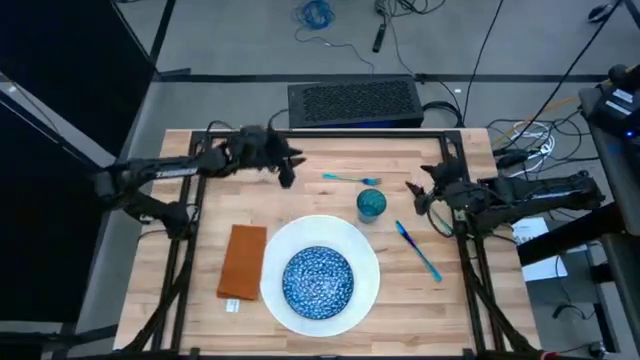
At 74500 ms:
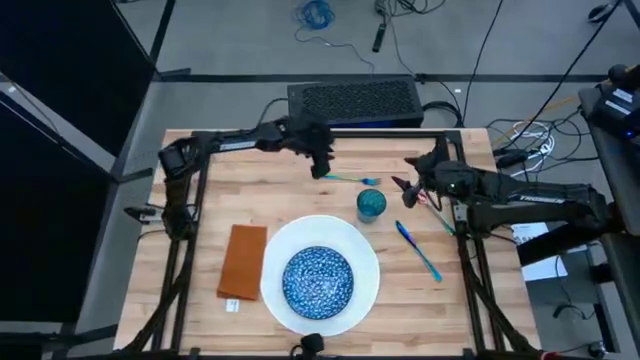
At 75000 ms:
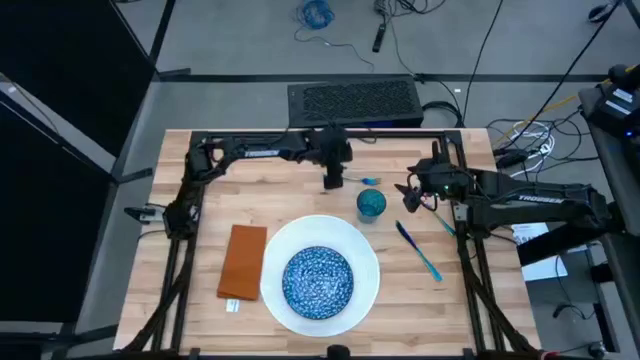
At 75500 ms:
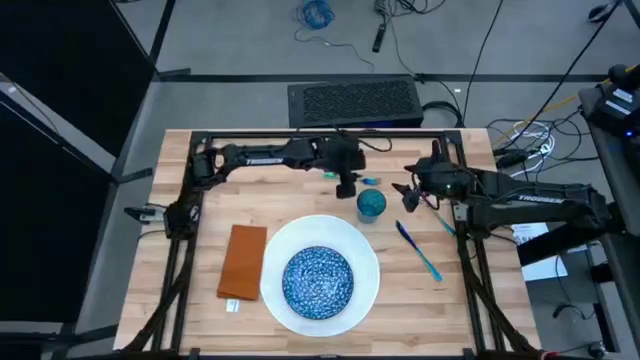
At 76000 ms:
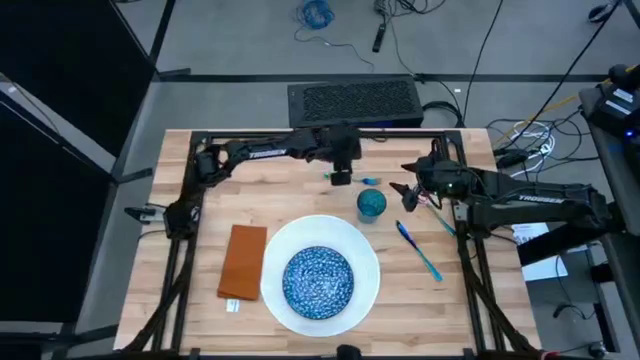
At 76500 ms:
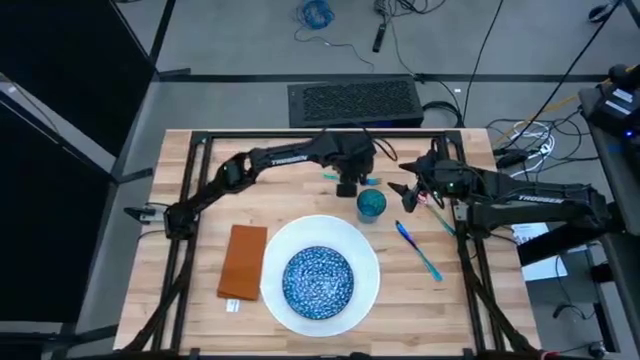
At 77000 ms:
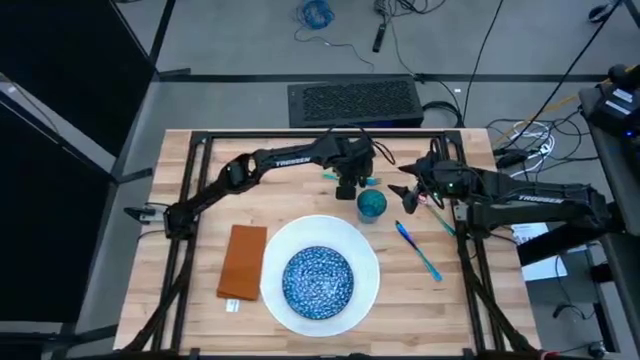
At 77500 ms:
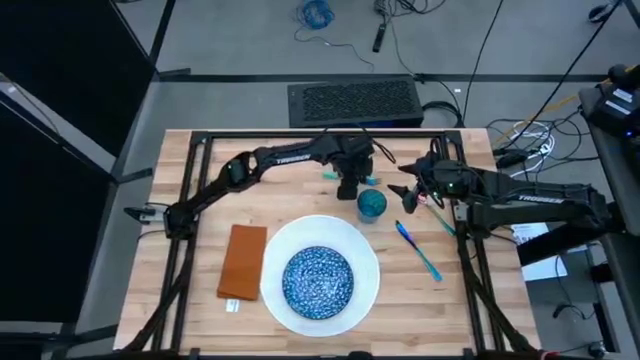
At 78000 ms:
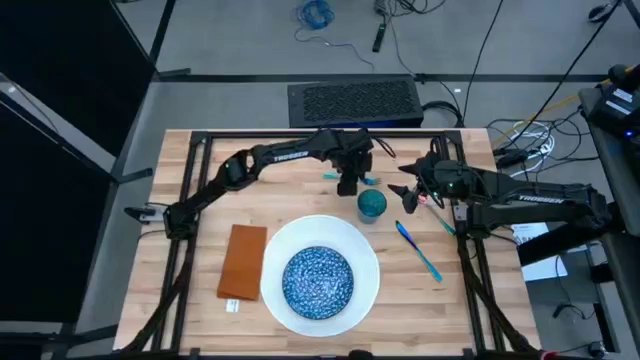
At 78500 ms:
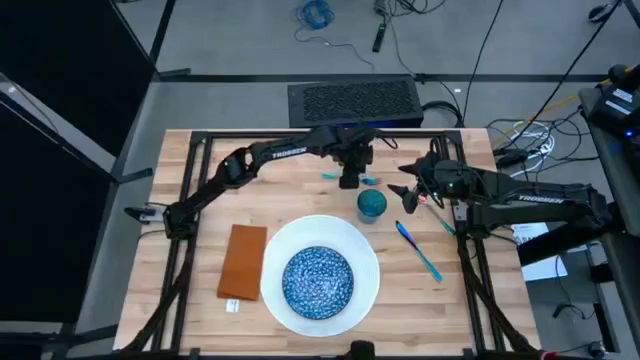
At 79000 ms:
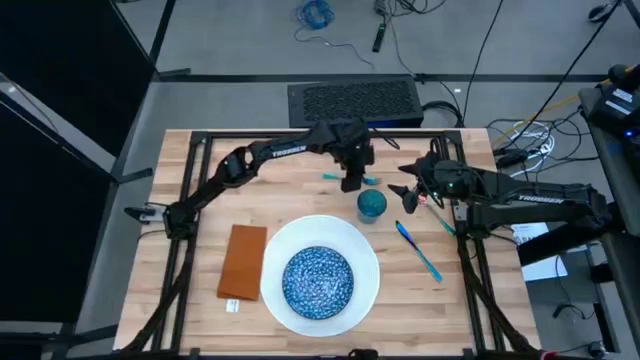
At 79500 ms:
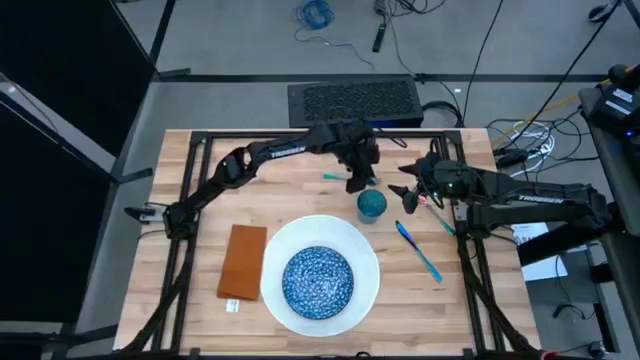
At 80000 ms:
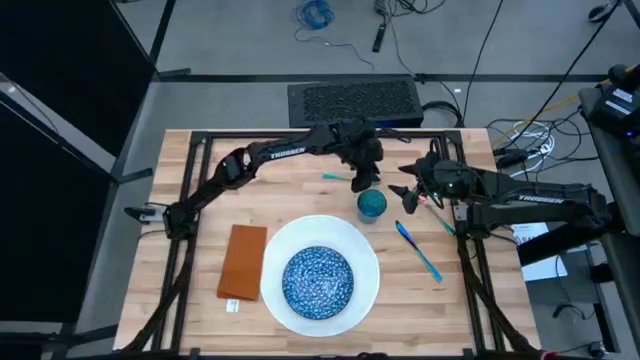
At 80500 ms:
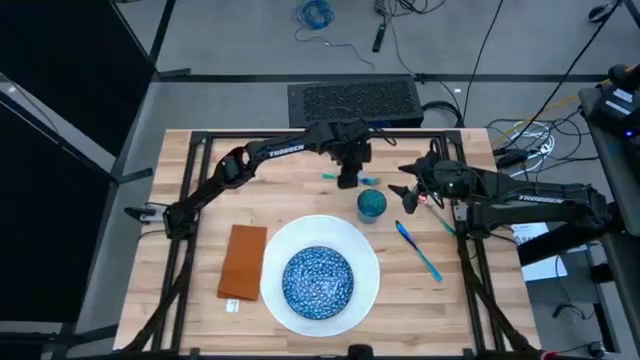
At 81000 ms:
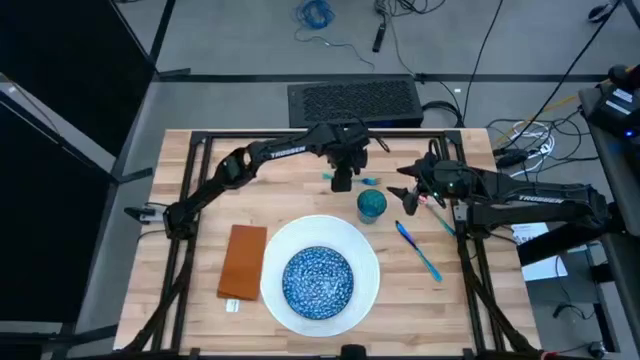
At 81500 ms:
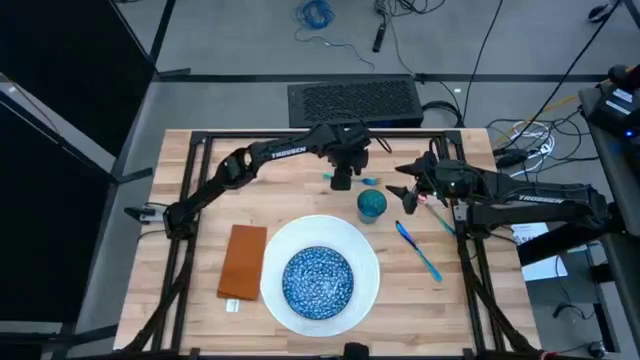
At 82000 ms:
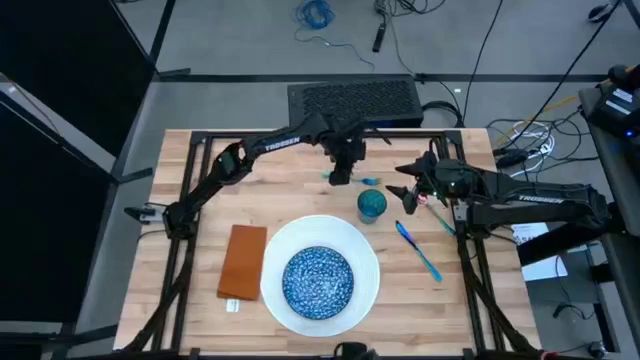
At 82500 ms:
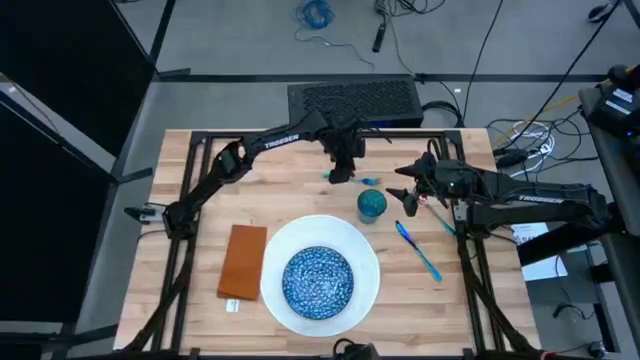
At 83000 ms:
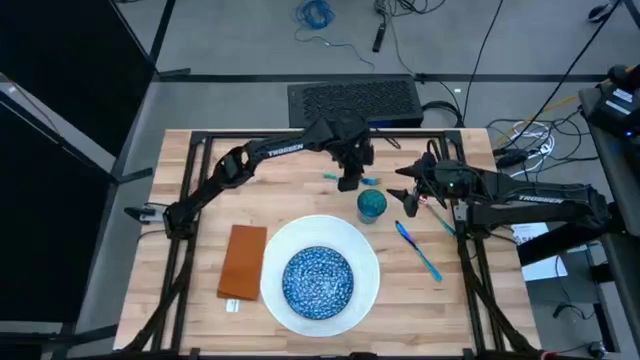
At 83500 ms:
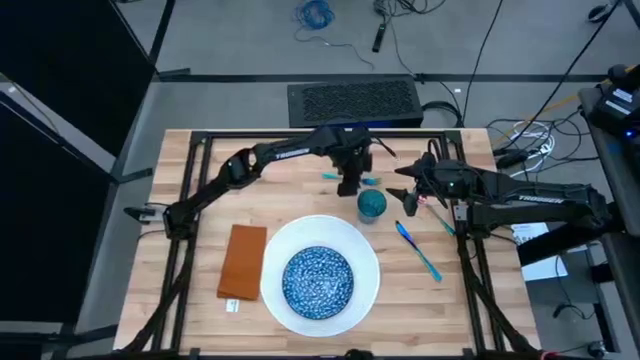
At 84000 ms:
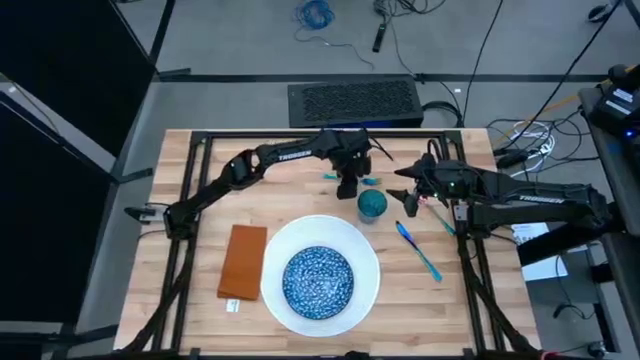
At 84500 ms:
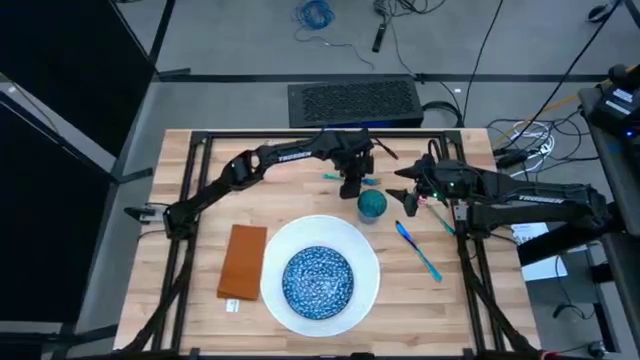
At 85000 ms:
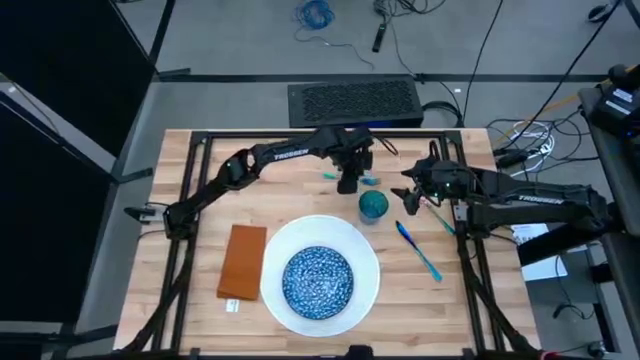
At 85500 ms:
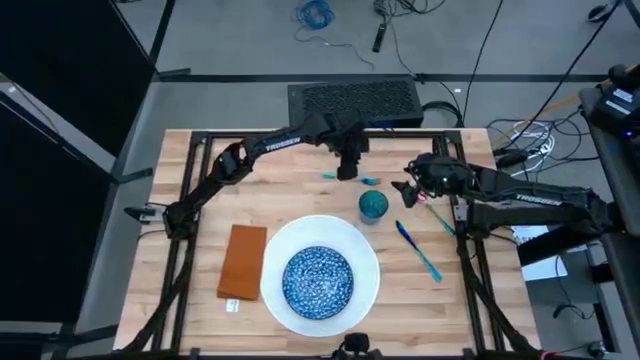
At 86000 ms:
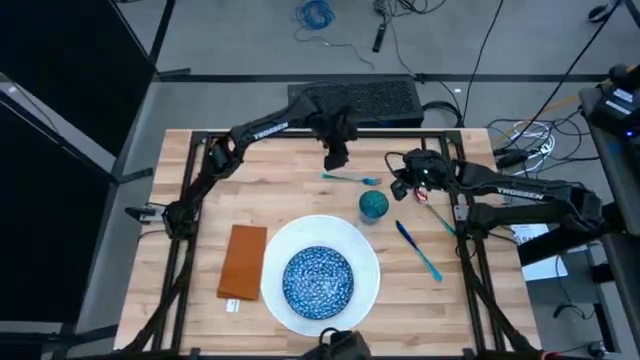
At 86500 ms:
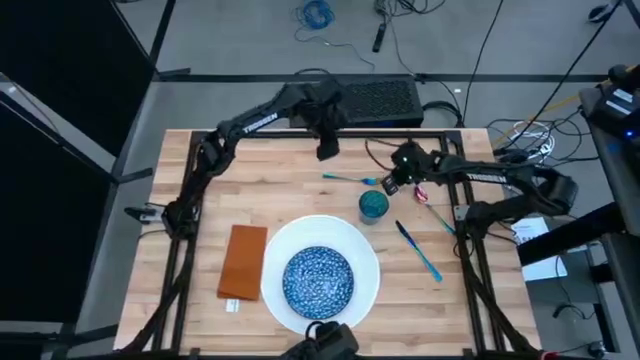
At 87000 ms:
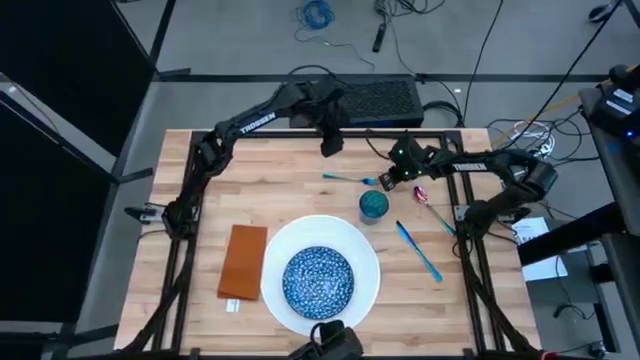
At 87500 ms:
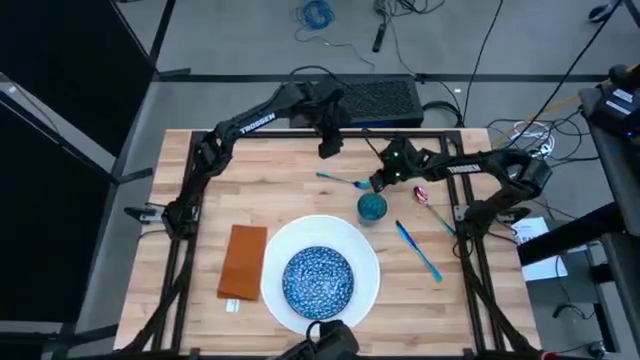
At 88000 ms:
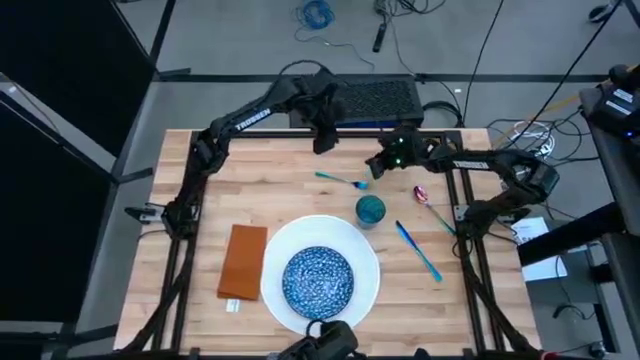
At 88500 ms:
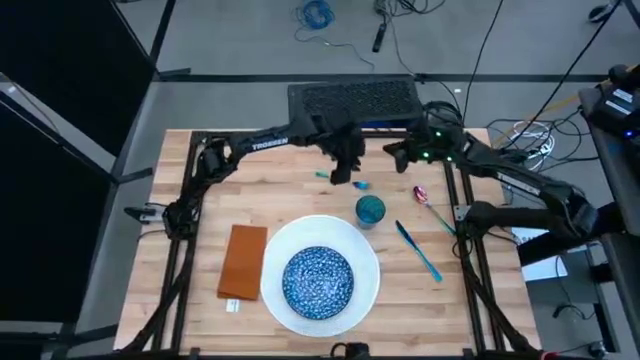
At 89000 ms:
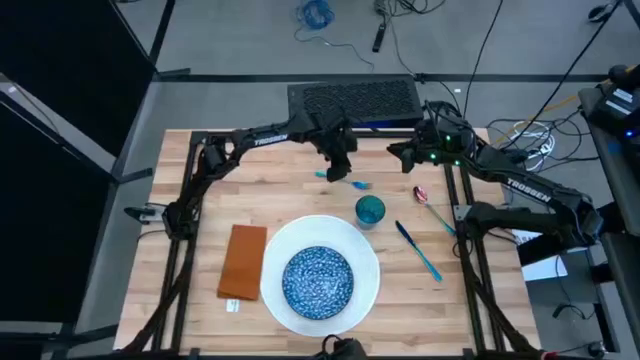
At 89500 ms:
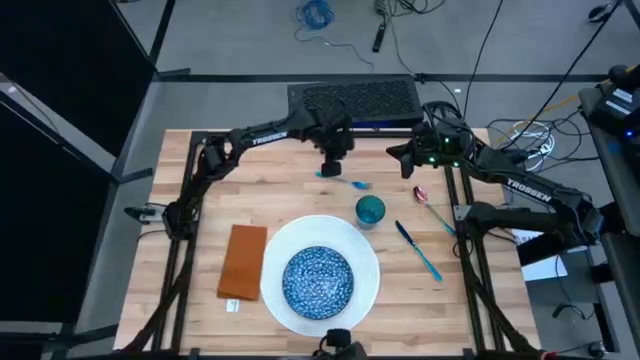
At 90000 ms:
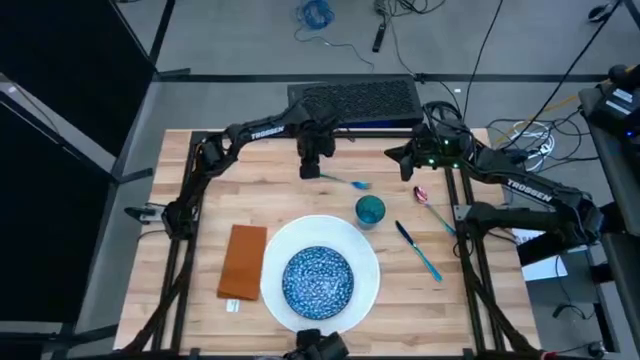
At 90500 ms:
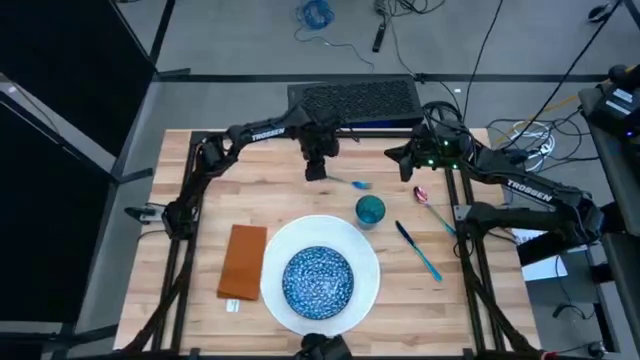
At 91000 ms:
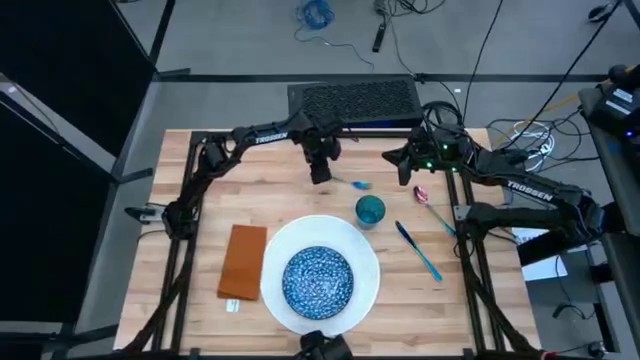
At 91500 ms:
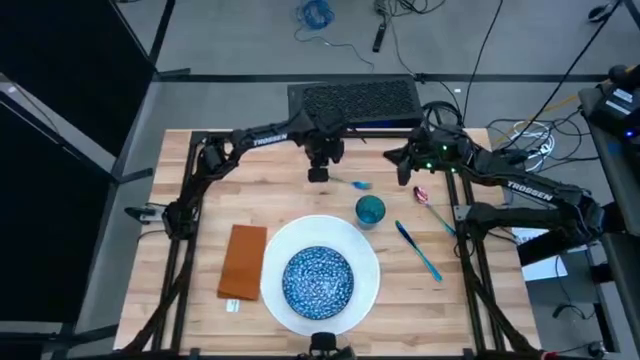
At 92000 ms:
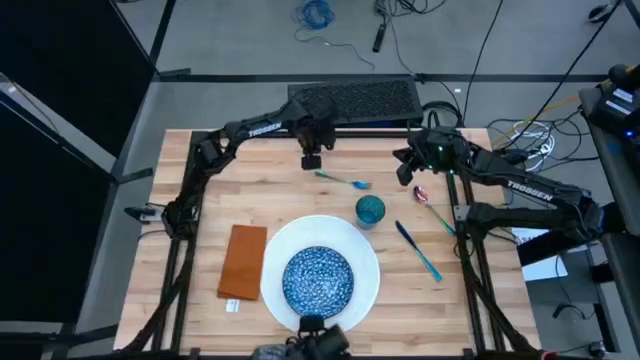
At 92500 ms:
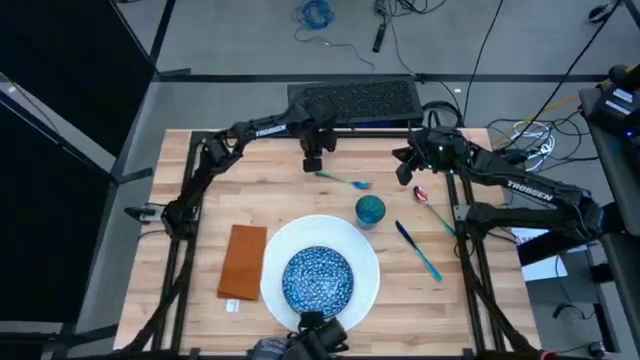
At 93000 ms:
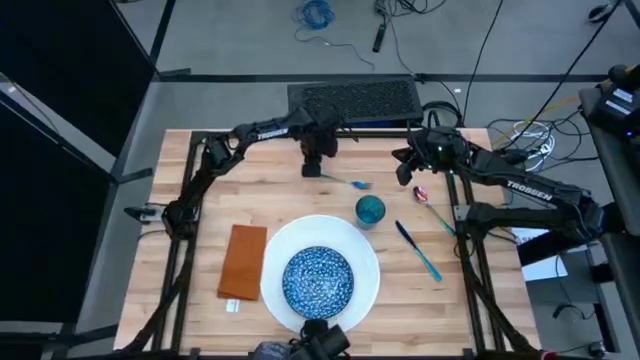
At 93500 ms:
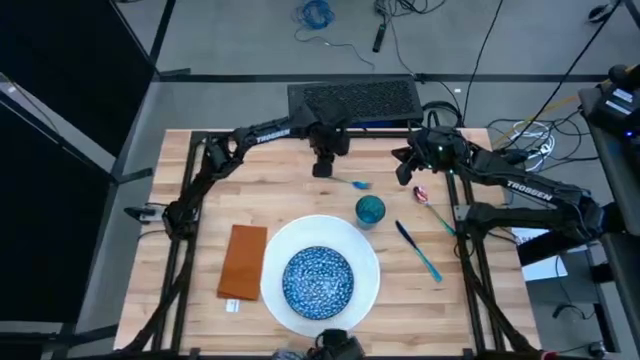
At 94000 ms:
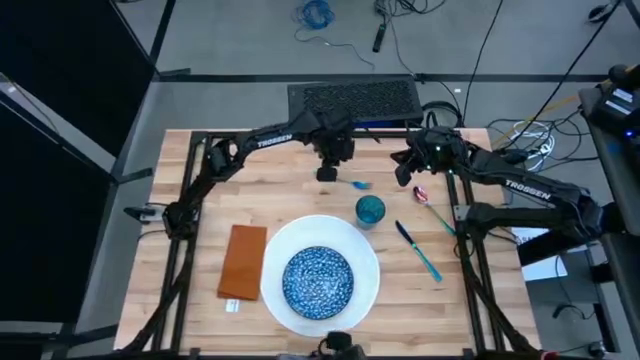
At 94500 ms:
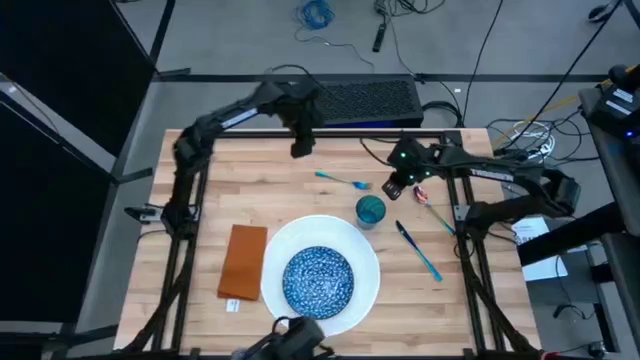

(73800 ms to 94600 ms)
Task: Set table place
Stack the blue fork on top of the brown table napkin
